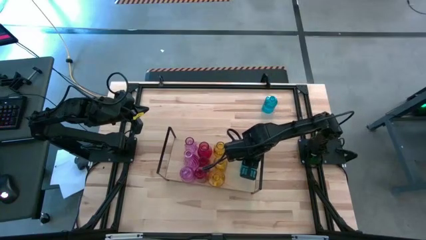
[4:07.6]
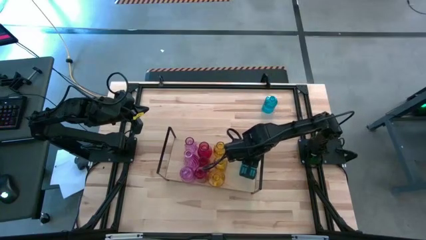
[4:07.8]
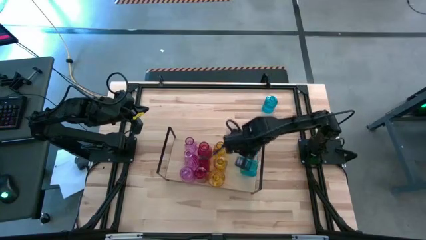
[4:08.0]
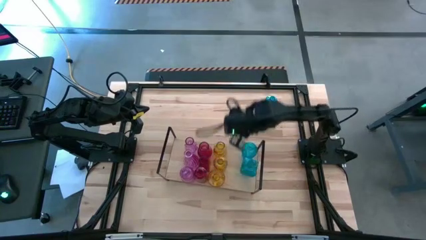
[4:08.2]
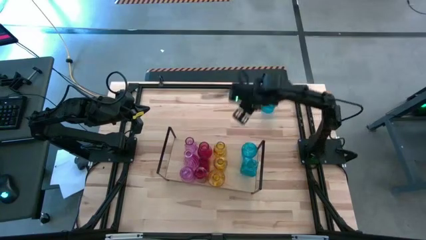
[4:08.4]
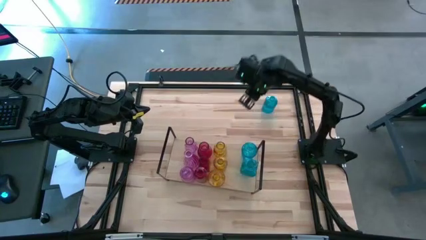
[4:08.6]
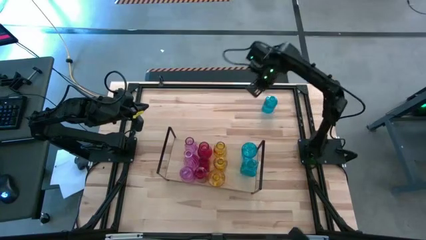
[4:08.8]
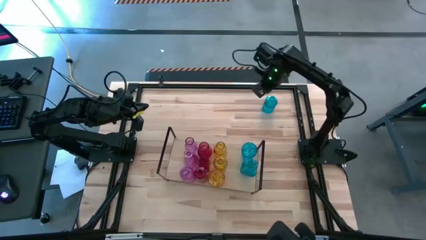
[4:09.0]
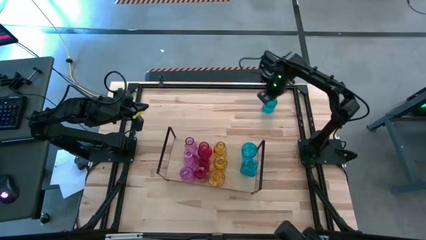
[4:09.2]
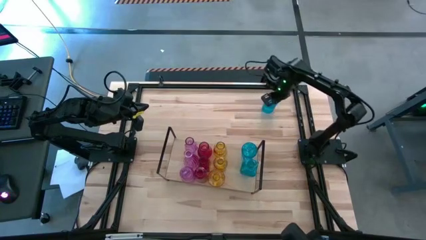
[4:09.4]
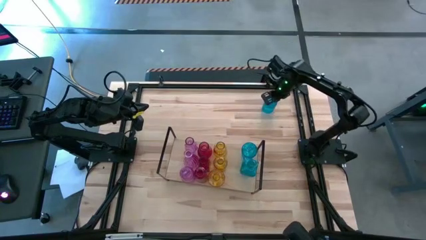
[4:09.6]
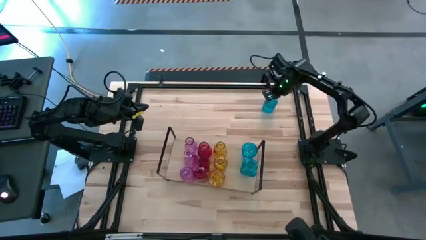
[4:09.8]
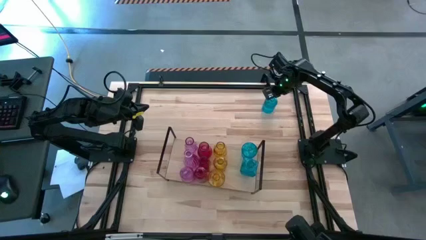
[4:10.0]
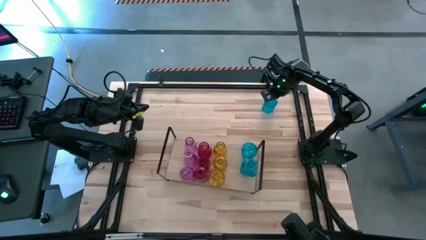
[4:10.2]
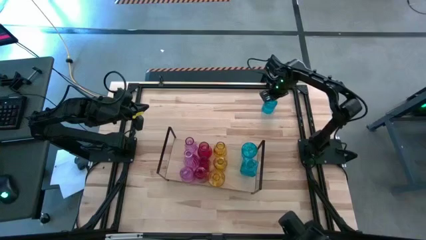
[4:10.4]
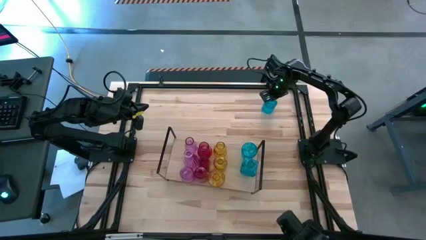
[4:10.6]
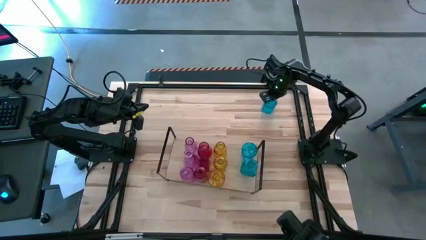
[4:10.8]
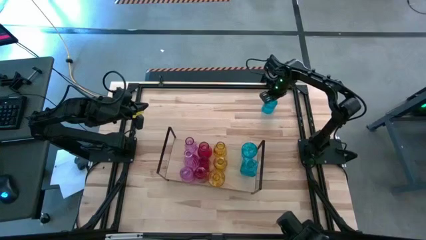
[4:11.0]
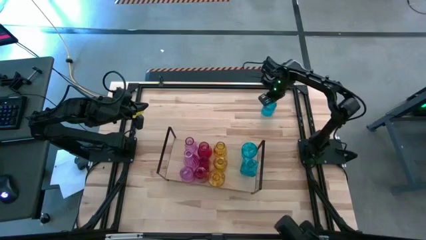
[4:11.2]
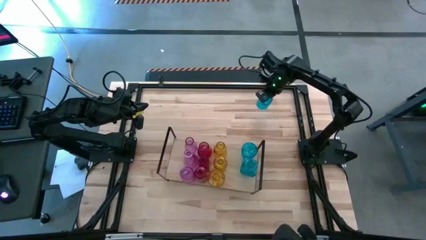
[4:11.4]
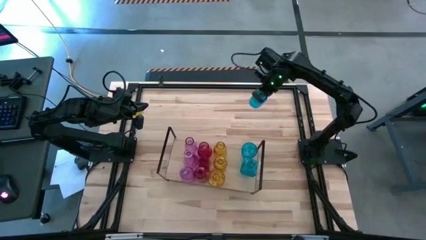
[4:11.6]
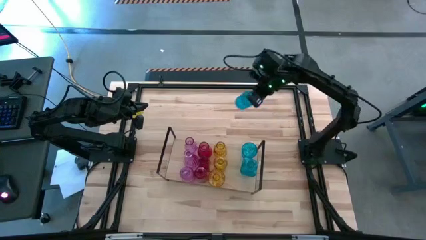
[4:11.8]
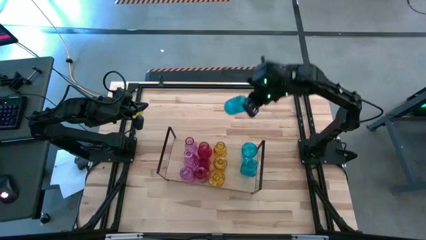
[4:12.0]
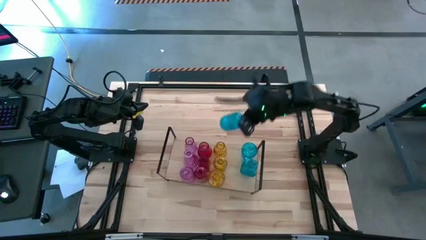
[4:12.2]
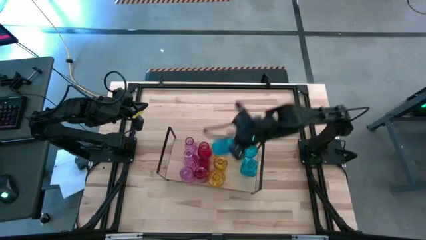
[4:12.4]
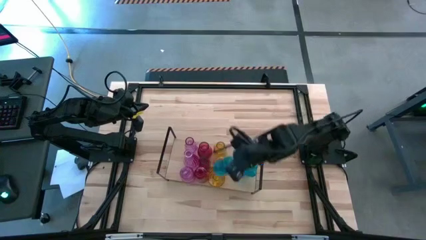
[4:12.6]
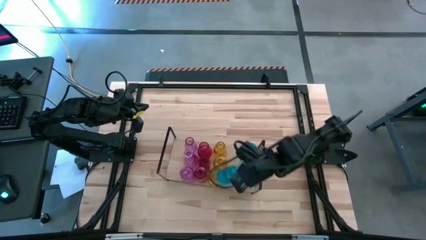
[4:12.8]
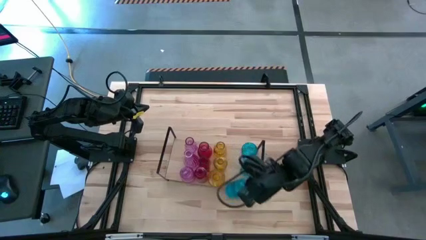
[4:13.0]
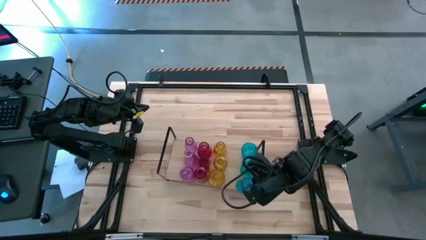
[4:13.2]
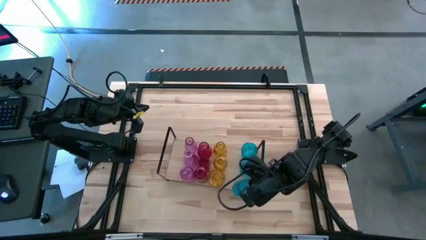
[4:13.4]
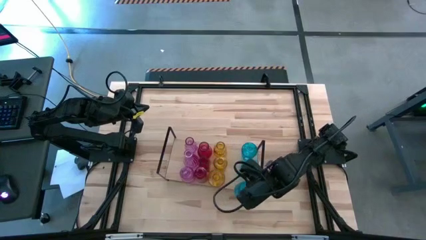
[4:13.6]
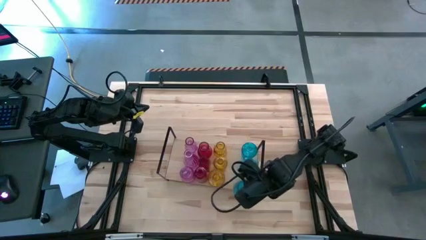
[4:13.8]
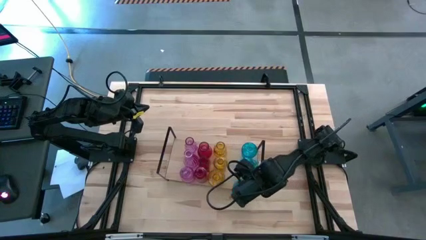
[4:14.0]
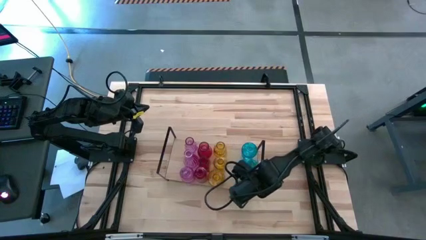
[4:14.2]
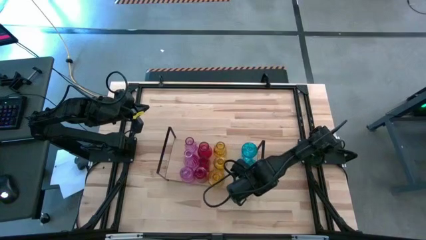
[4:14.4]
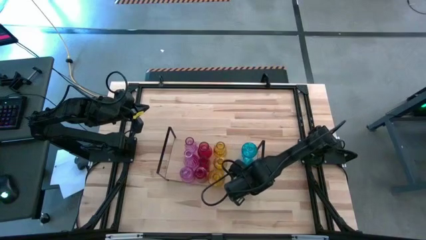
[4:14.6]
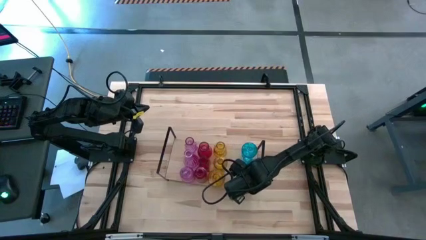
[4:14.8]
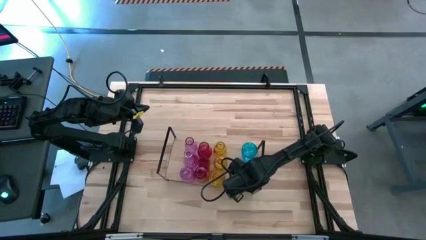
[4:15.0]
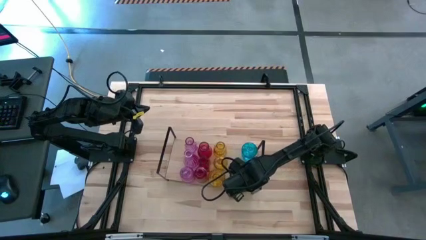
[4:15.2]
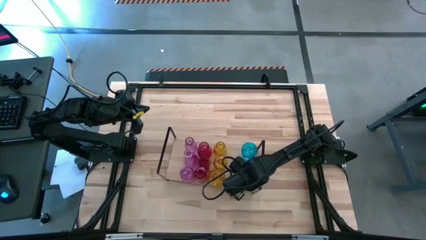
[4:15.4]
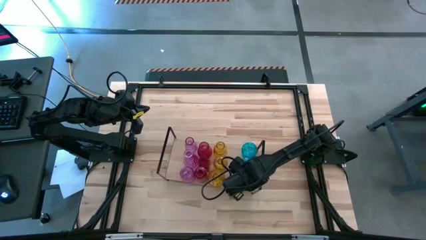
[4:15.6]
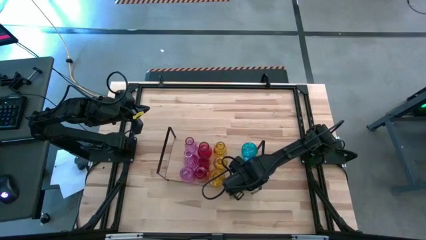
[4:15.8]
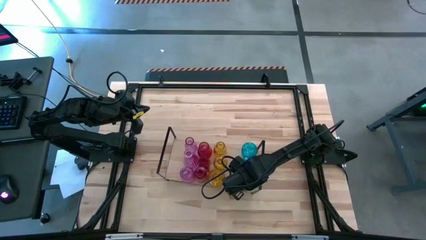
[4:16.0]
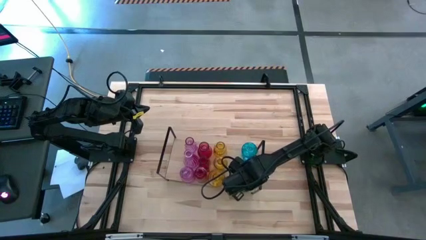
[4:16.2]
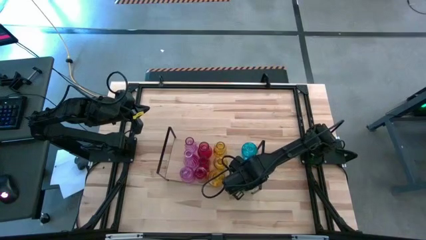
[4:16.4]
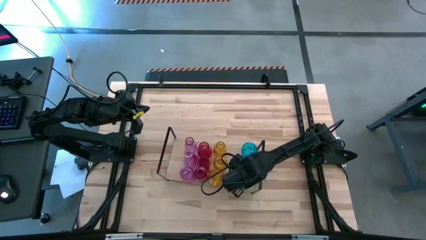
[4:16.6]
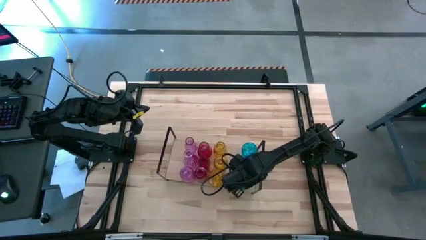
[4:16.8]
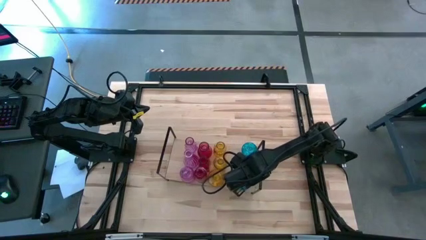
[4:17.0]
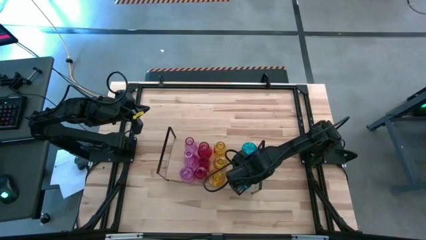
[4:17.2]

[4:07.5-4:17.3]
Task: sort vases onto shelf
Put the blue vase on the shelf aligned with the other blue vases

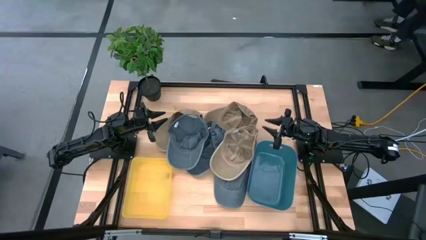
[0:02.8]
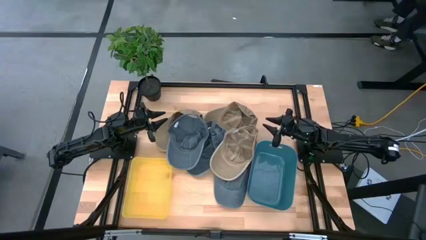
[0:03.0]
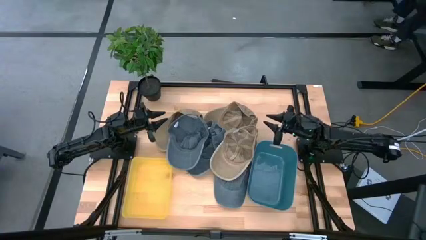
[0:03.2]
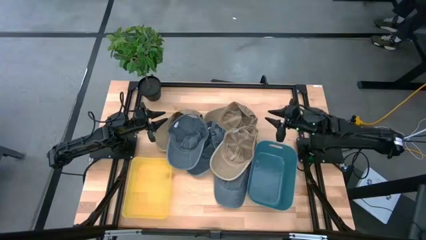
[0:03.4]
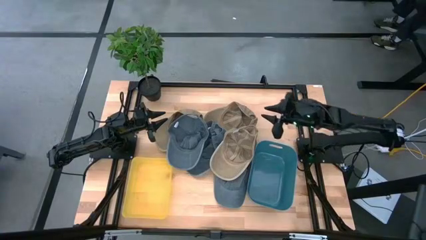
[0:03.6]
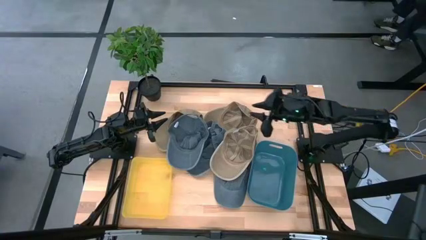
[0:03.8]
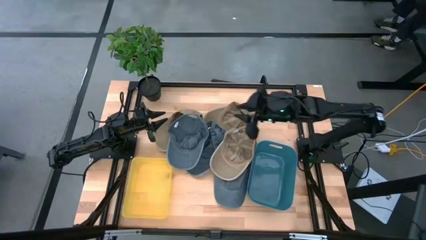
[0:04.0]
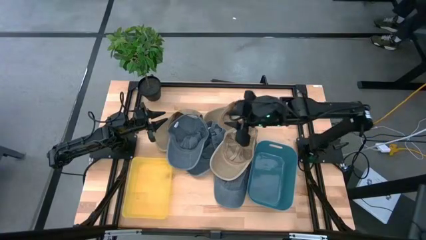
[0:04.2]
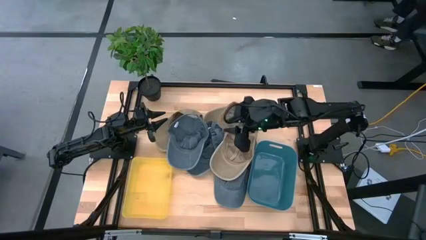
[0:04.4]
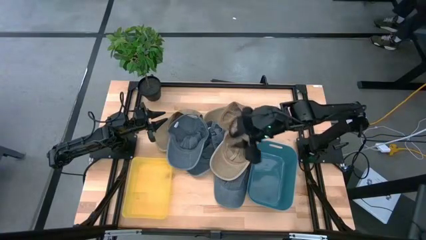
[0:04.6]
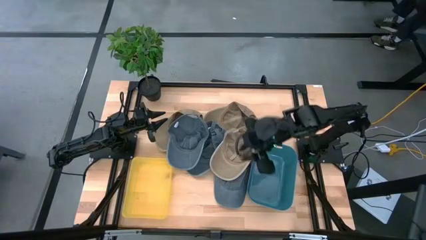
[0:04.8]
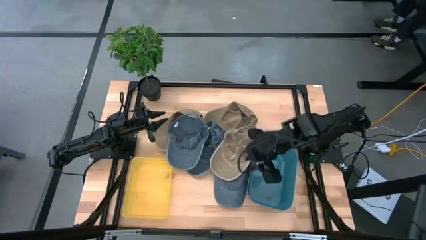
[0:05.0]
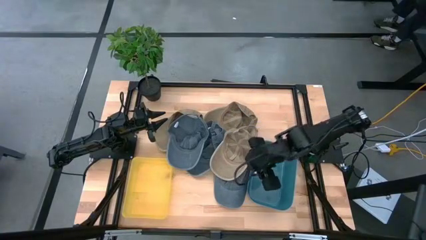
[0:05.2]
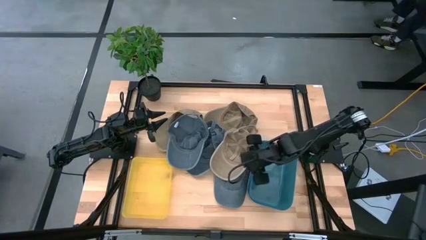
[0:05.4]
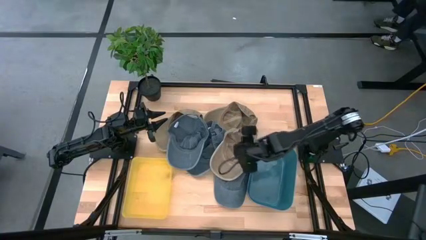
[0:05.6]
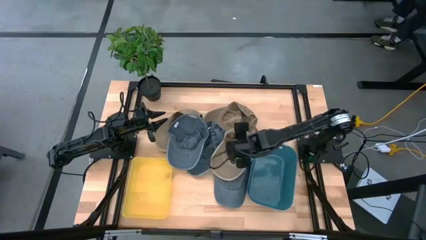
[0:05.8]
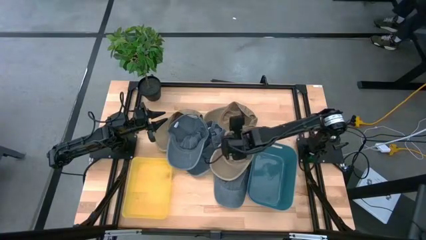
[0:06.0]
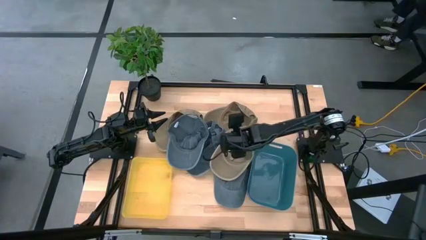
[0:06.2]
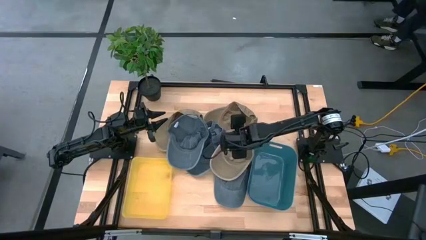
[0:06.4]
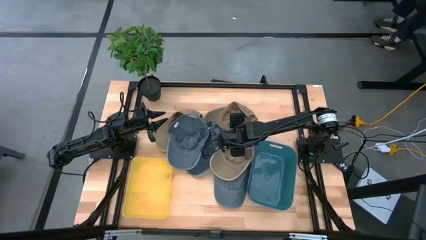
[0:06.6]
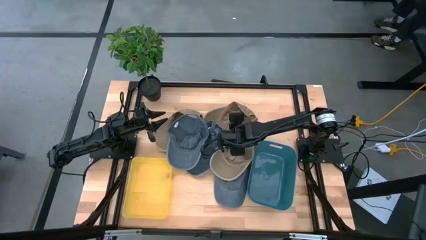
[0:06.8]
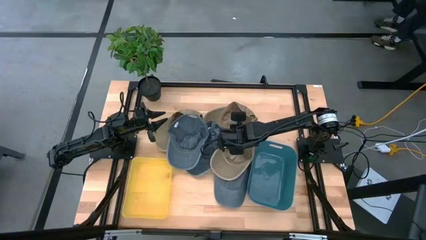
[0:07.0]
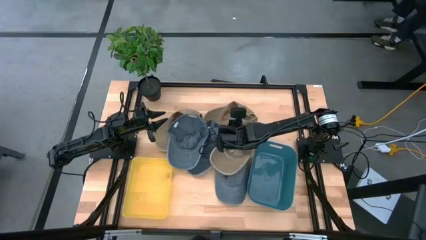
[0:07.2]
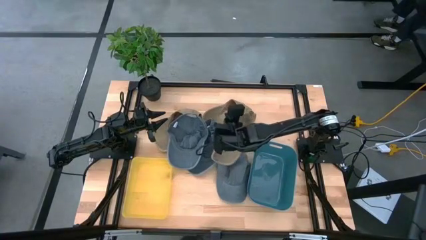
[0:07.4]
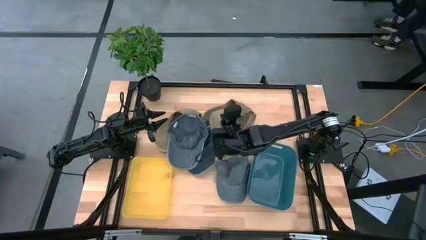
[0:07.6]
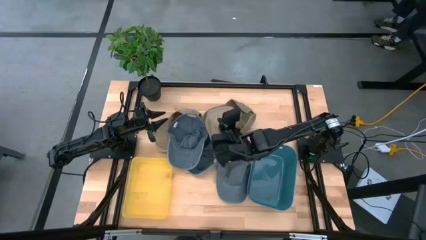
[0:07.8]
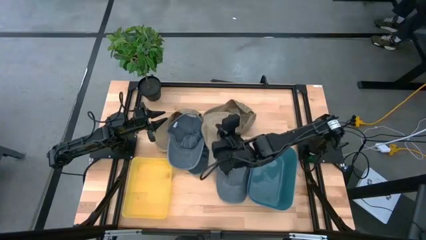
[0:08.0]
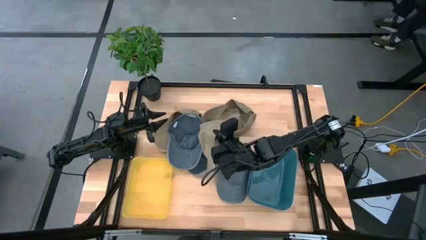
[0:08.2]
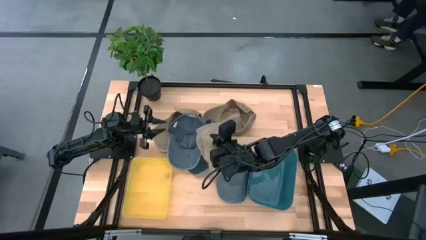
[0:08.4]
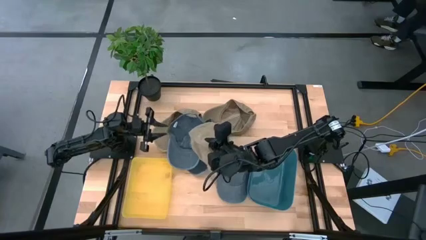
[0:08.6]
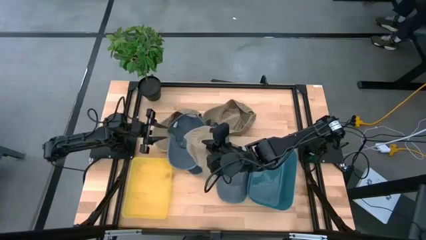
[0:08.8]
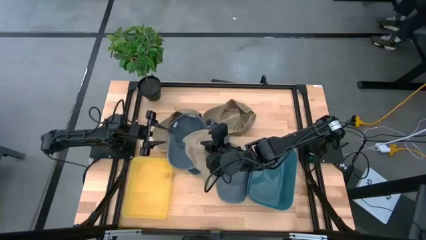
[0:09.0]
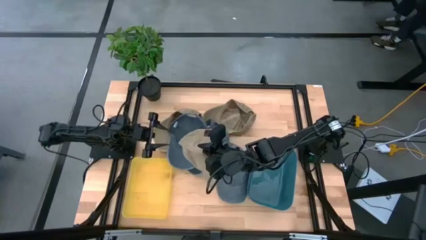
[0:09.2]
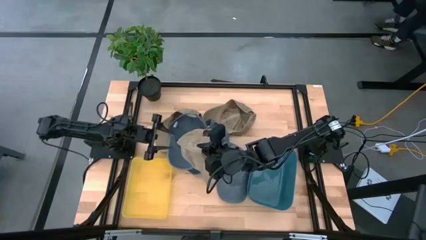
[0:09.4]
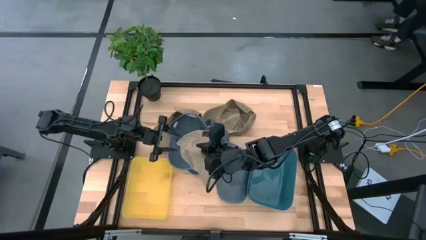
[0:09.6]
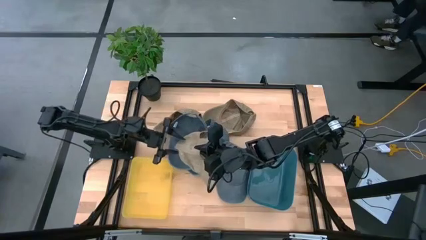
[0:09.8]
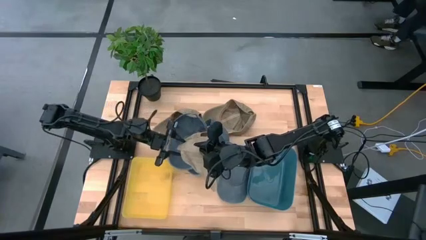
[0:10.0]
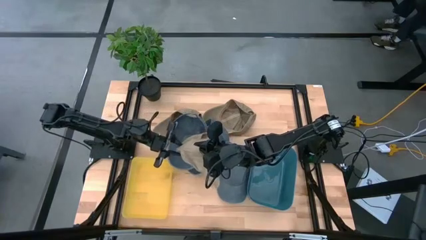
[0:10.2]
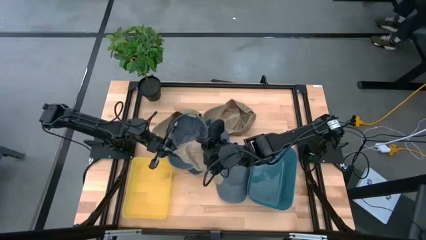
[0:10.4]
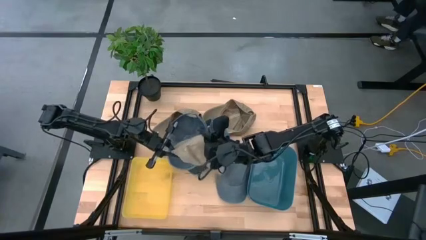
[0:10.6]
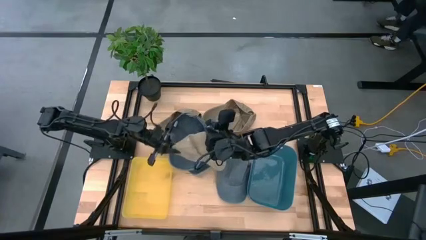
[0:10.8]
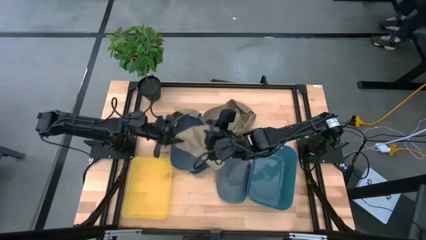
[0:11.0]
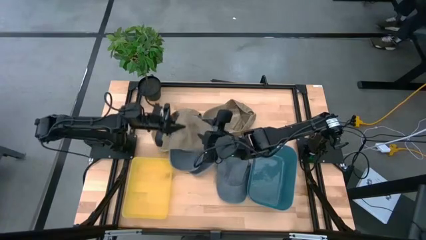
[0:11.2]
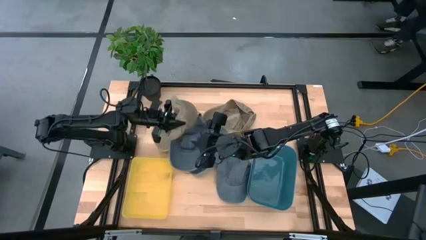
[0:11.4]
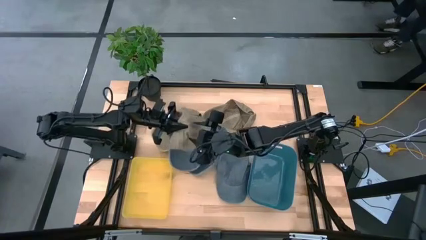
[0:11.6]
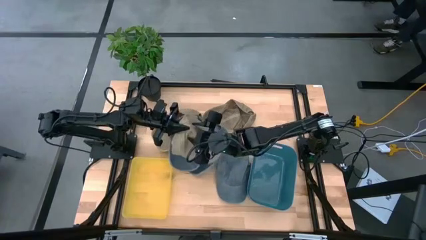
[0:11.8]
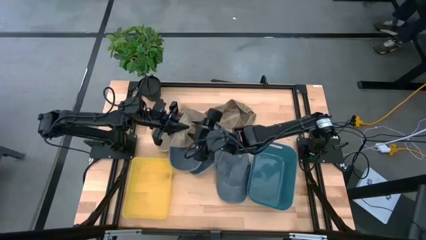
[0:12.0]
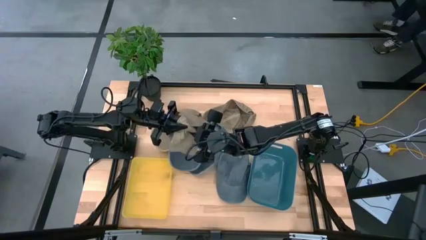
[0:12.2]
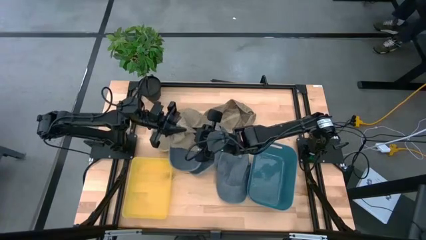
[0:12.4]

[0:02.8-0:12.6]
Task: Pick & Place hat
Put the bottom brown cap into the blue bin
